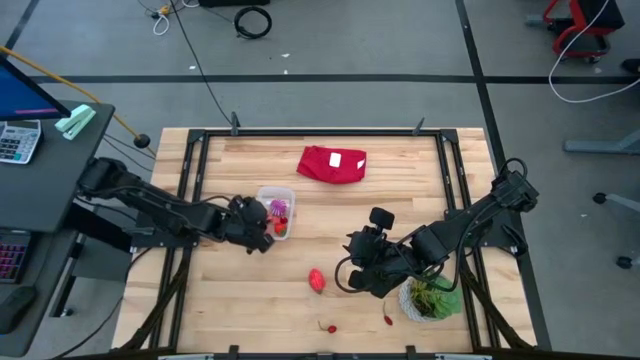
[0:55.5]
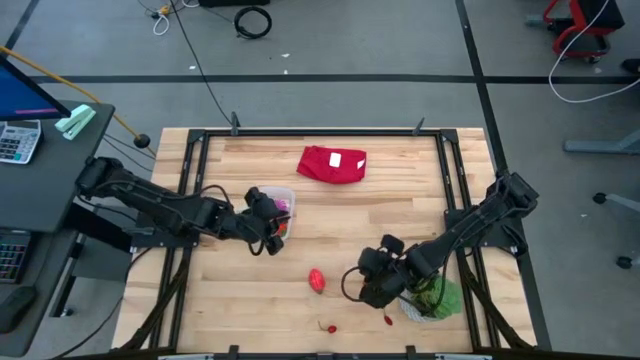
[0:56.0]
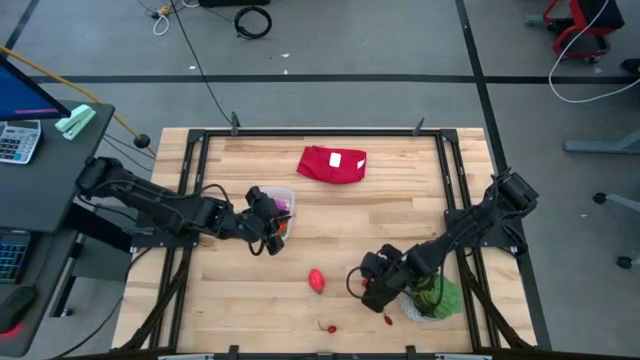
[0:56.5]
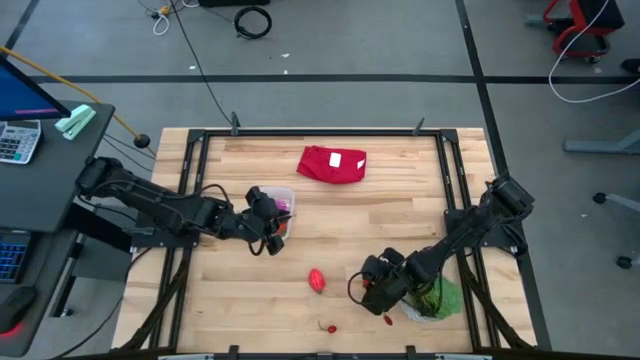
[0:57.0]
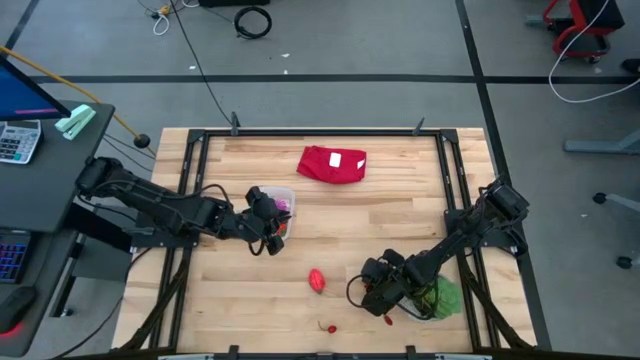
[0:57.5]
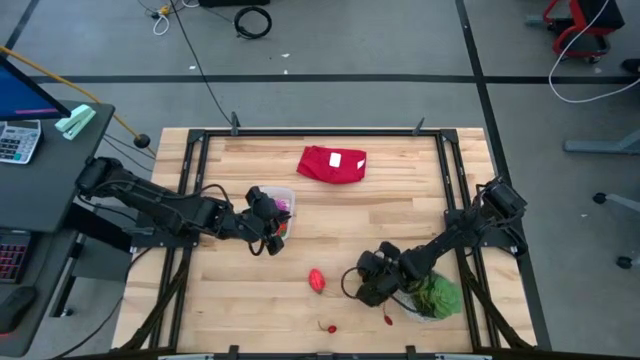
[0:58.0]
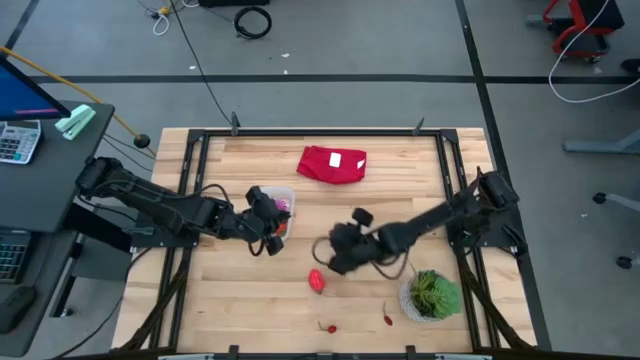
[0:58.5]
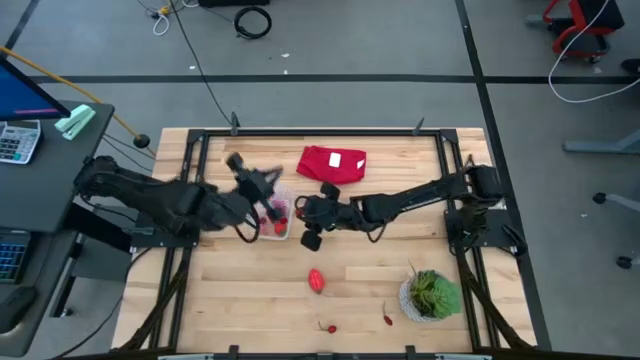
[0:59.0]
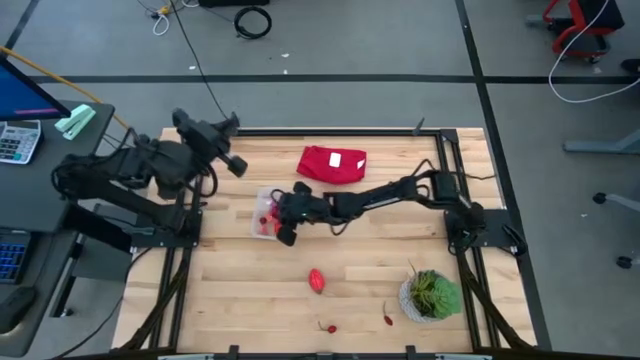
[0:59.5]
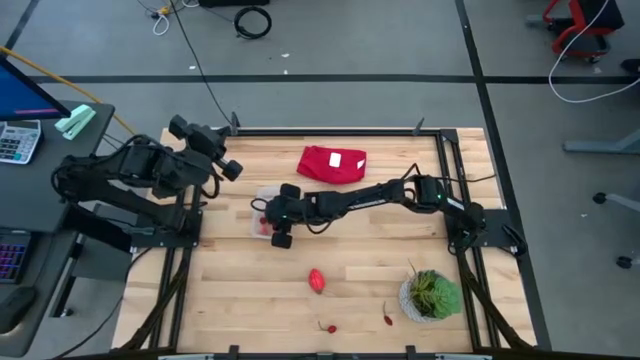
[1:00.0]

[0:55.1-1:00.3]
Task: Pick and placing Produce into tupperware
Put the red raspberry in the transparent bin

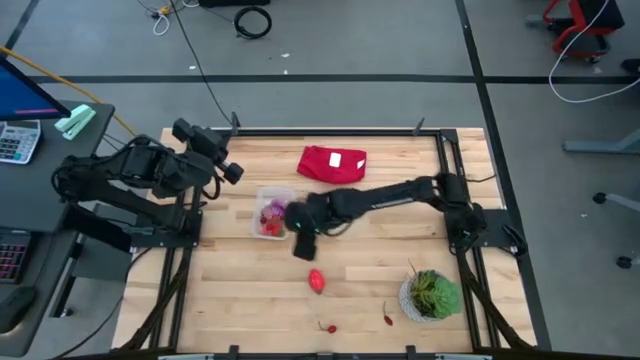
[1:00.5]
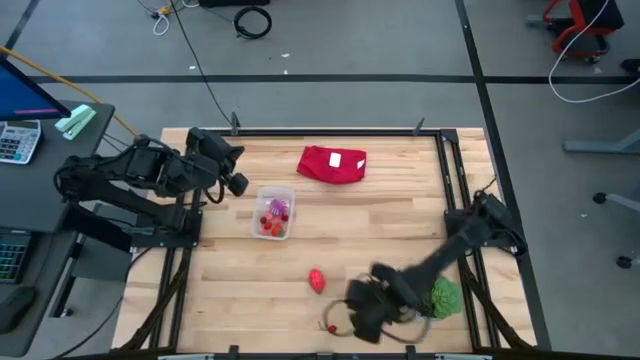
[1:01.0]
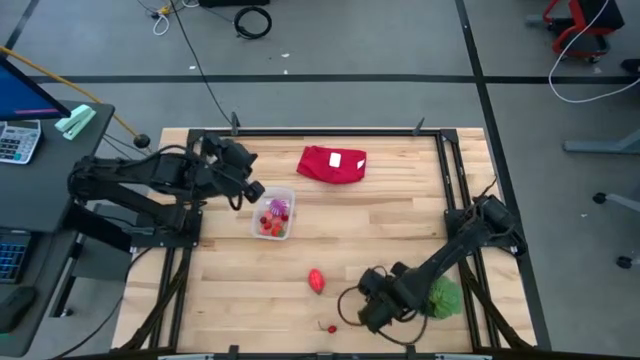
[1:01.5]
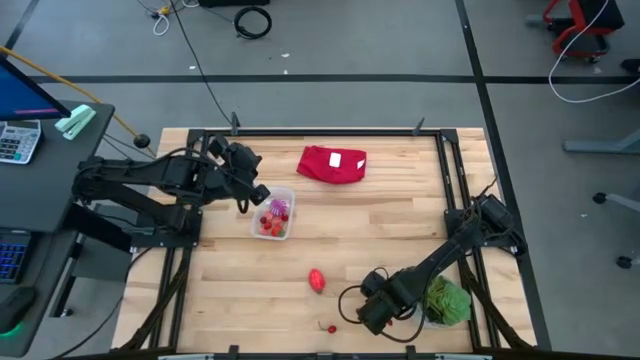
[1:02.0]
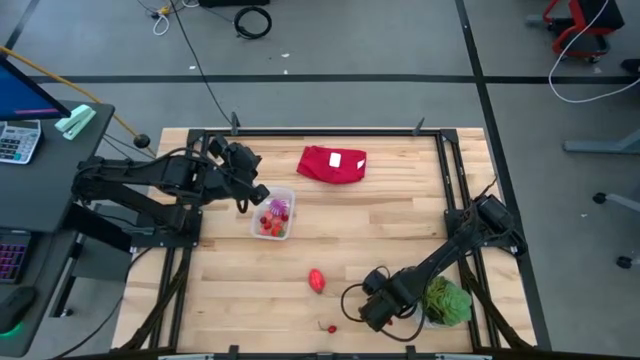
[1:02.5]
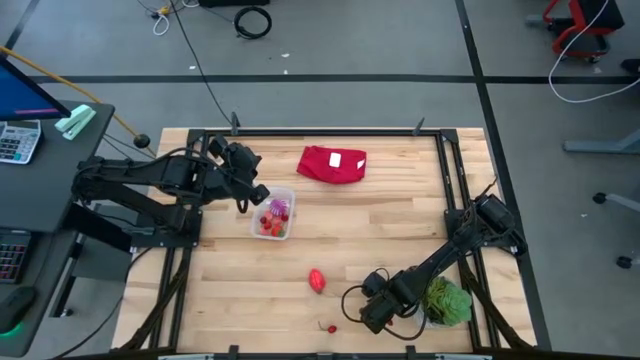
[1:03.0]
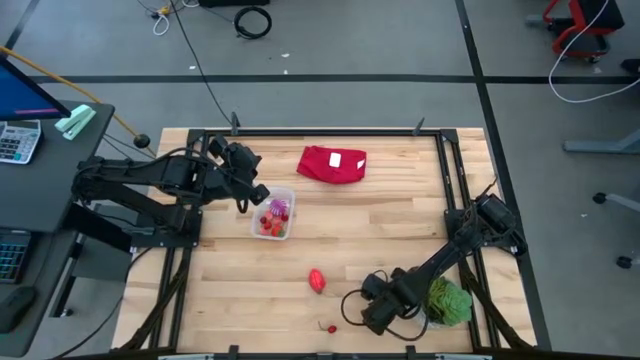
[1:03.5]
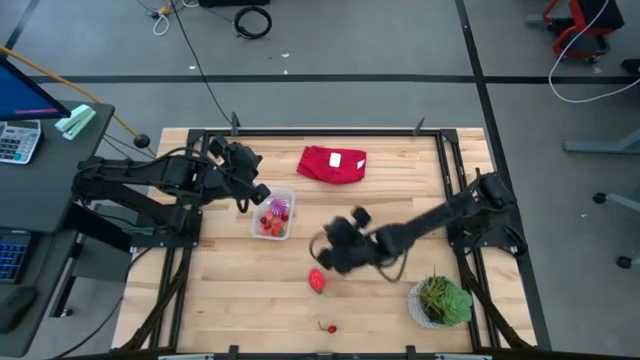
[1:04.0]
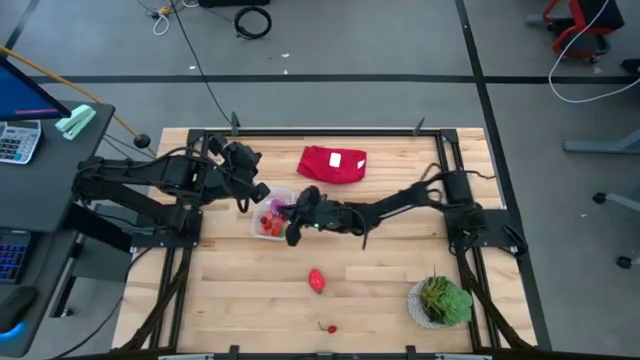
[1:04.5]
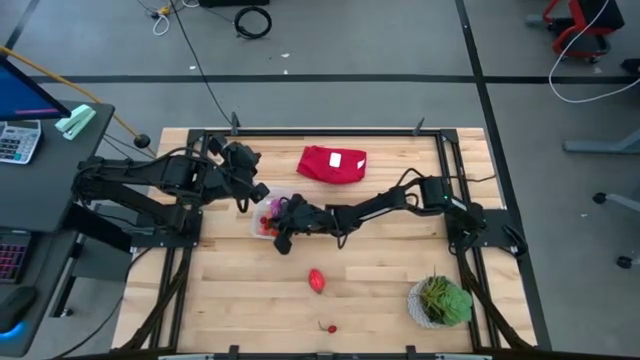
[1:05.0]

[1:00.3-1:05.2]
Put the red cherry in the transparent bin

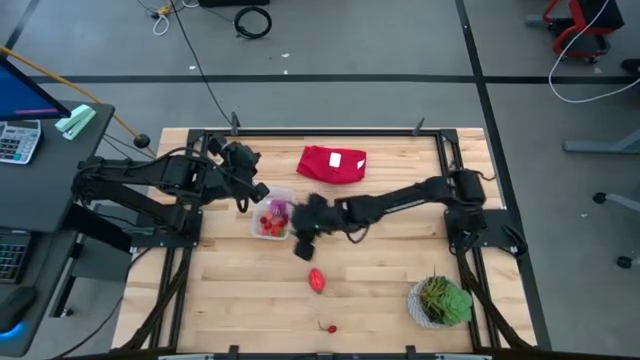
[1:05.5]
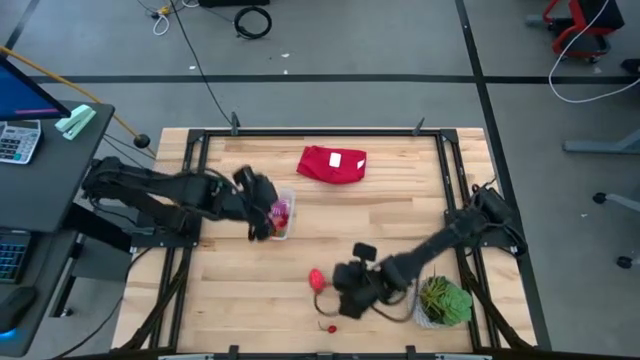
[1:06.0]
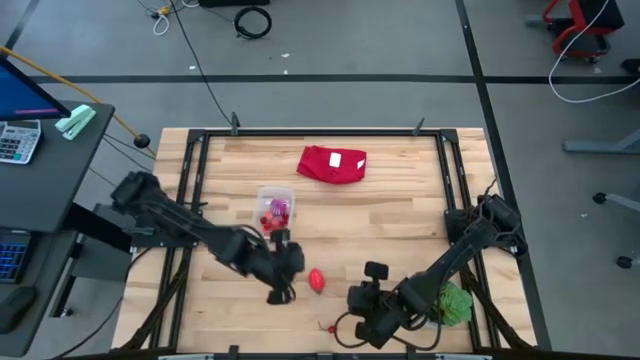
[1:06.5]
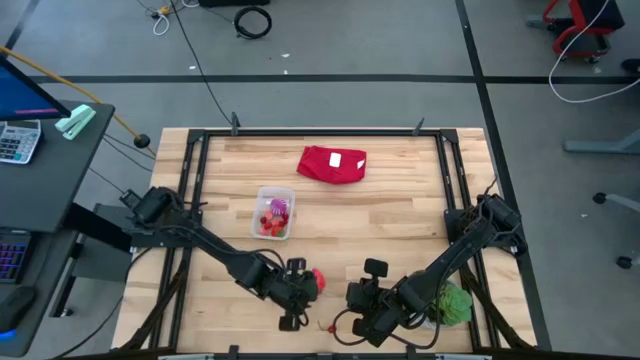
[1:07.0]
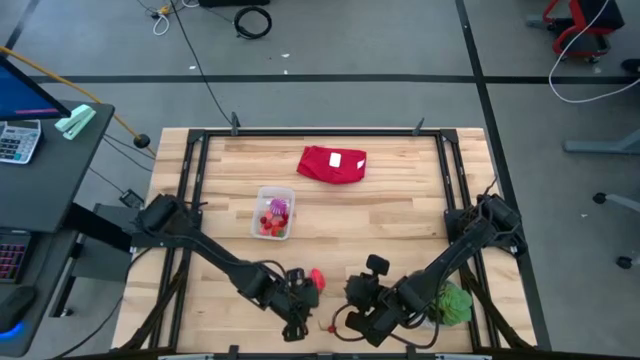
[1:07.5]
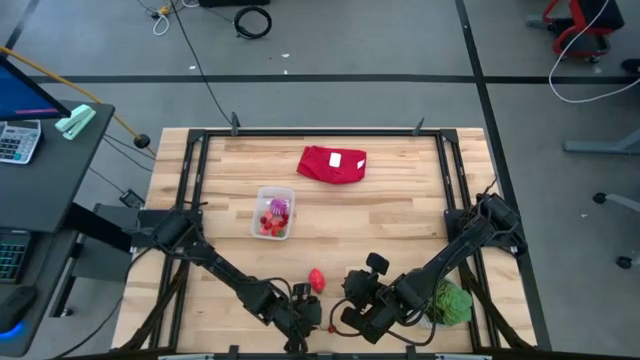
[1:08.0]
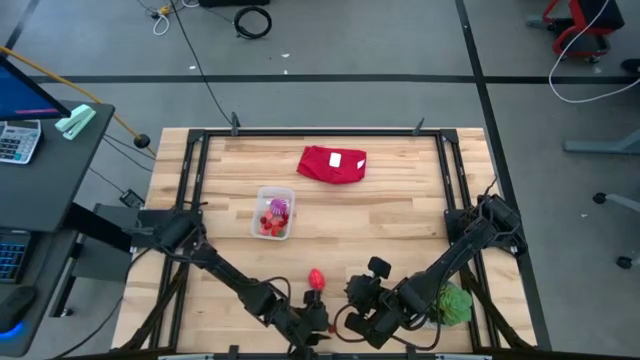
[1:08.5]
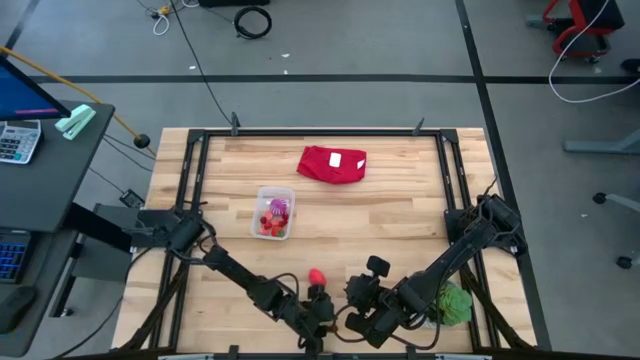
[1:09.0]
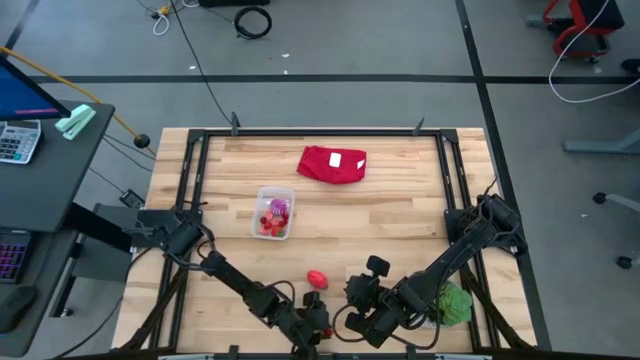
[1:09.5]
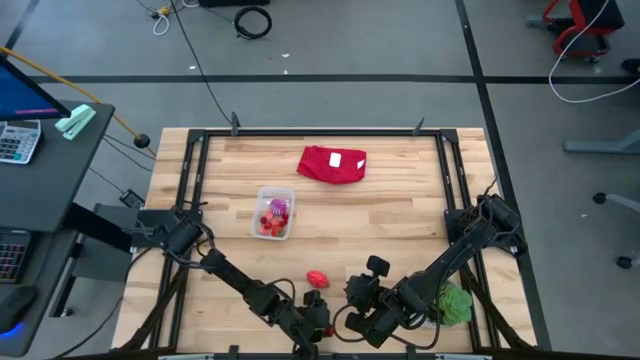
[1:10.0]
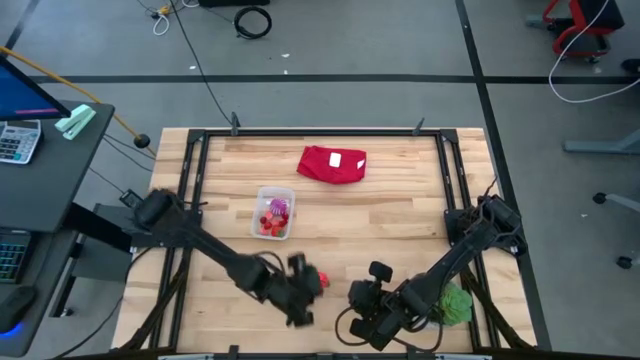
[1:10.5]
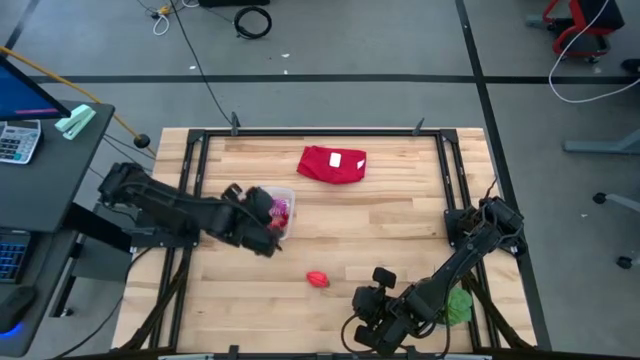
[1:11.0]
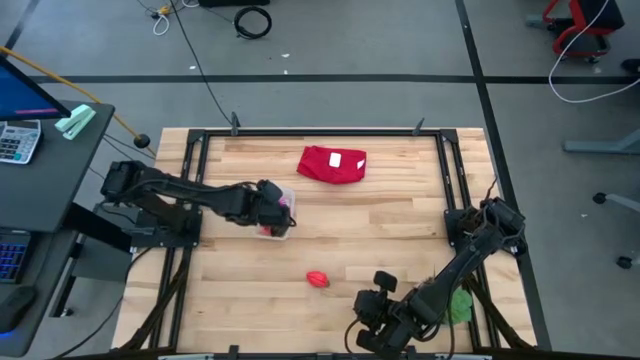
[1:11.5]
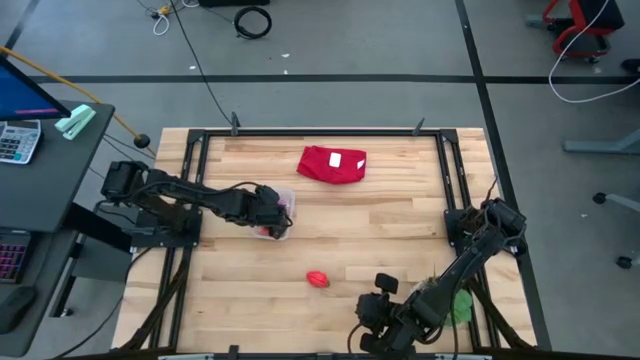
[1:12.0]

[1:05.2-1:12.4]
Put the red cherry in the transparent bin

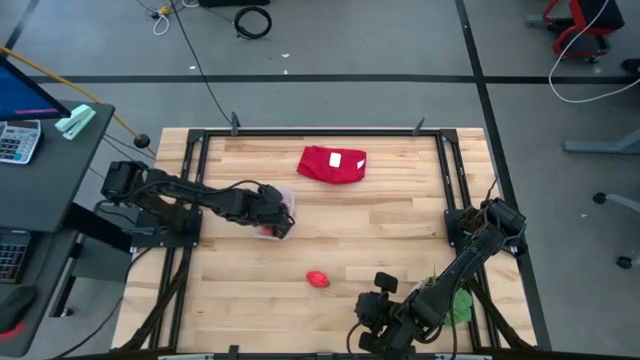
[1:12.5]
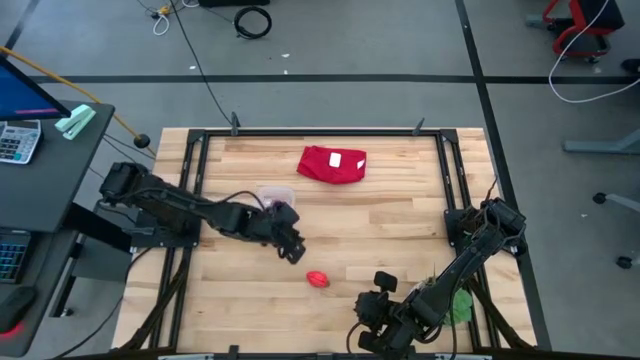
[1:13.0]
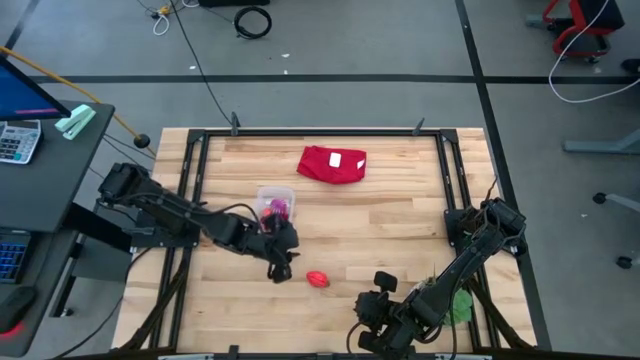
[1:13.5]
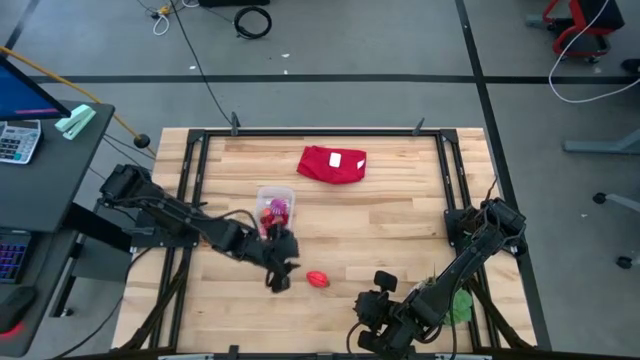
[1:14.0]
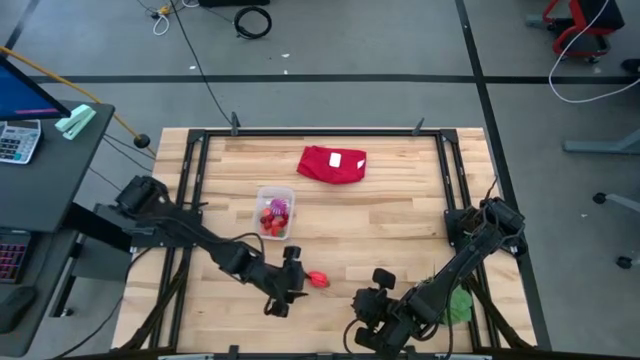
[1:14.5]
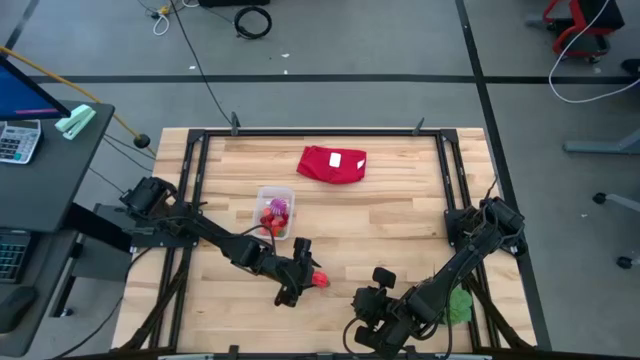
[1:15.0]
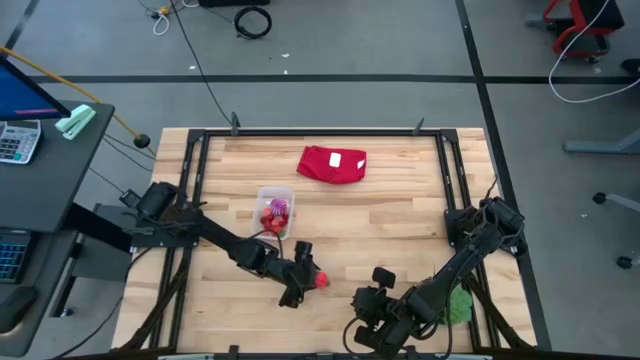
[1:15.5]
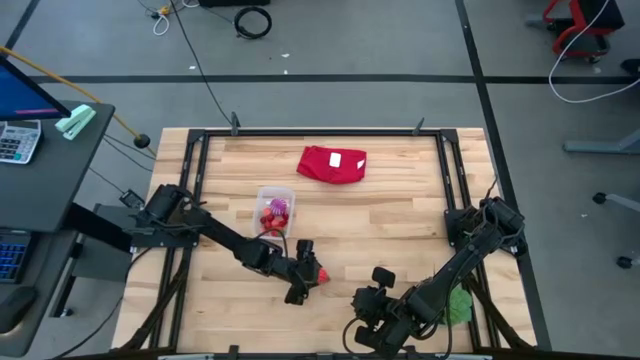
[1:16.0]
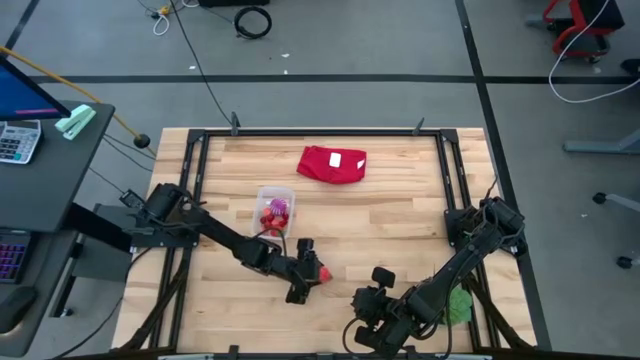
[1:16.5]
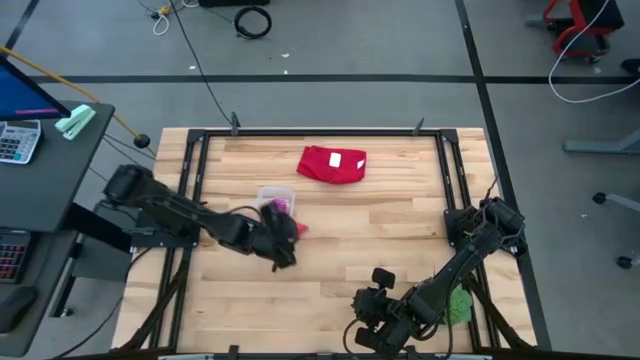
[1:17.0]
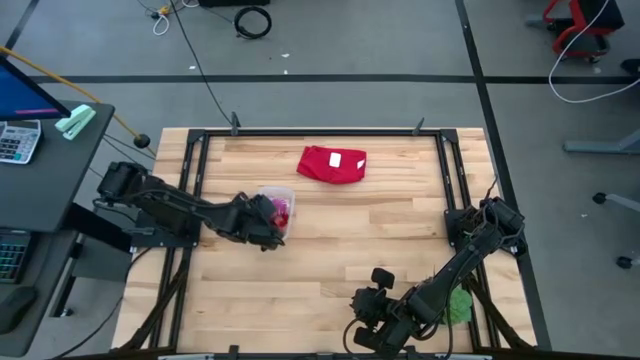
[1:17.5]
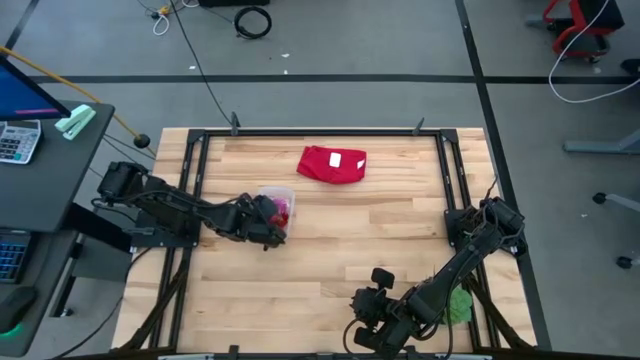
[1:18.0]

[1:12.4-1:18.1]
Put the red dragon fruit in the transparent bin
